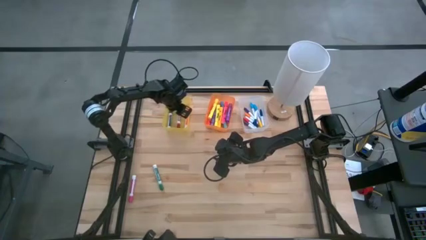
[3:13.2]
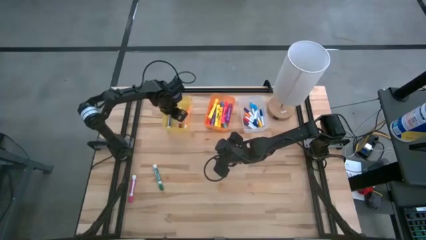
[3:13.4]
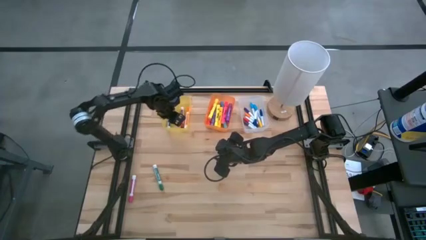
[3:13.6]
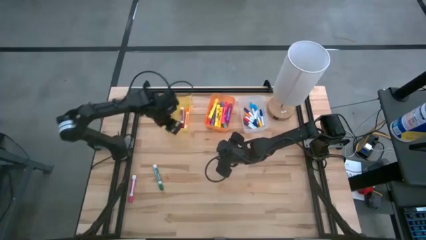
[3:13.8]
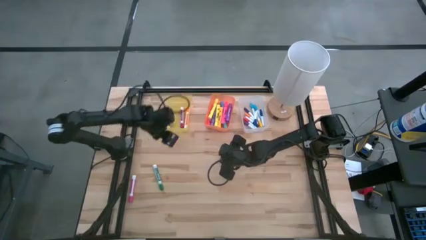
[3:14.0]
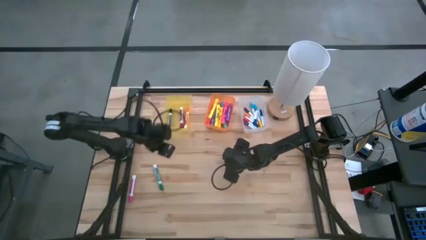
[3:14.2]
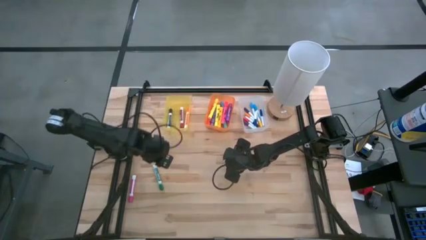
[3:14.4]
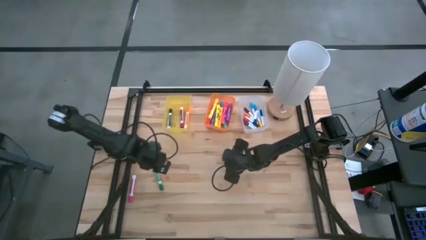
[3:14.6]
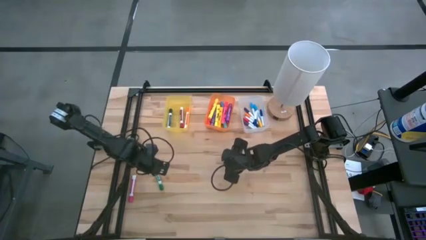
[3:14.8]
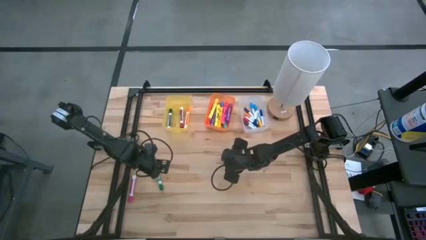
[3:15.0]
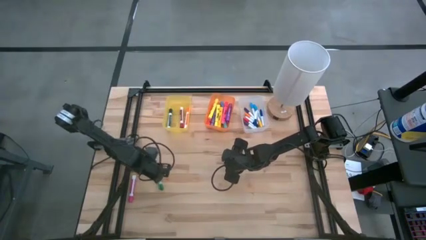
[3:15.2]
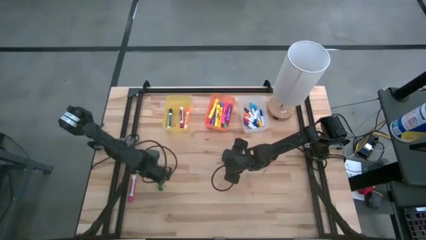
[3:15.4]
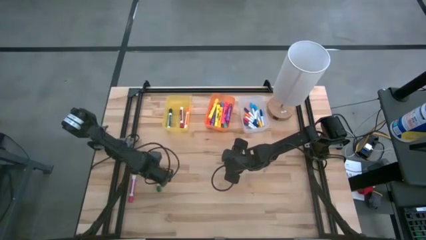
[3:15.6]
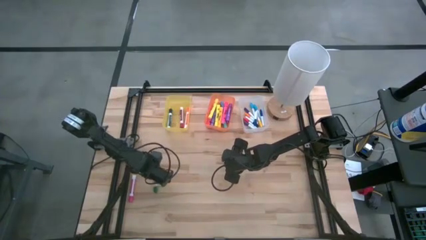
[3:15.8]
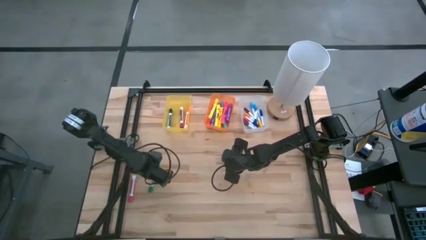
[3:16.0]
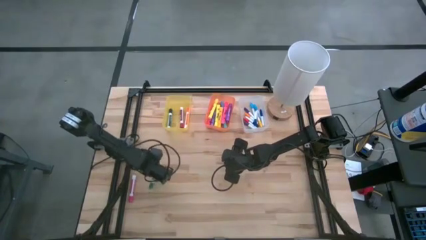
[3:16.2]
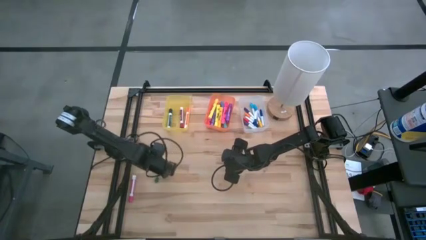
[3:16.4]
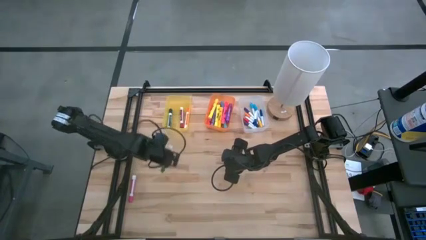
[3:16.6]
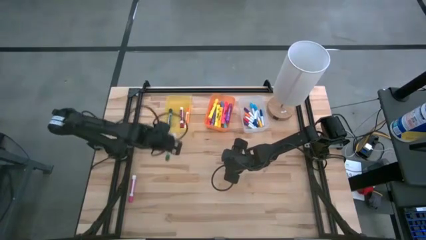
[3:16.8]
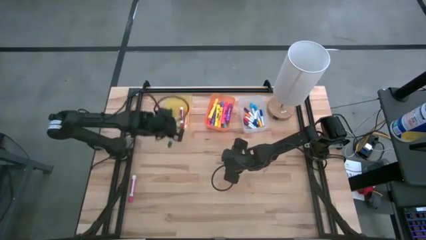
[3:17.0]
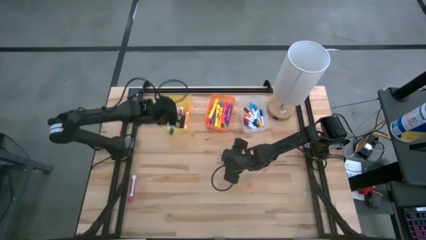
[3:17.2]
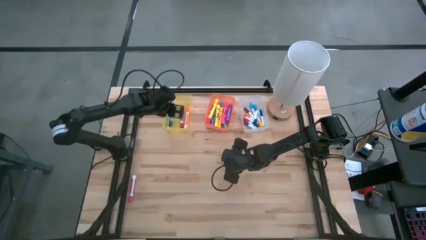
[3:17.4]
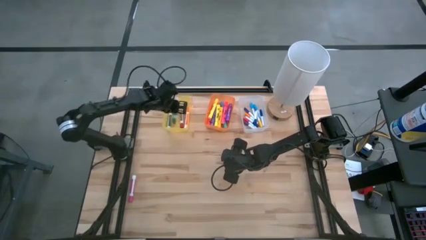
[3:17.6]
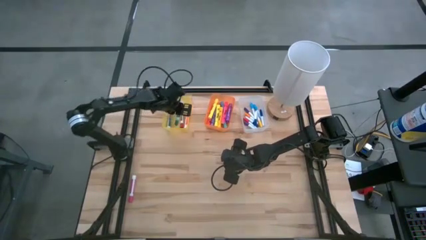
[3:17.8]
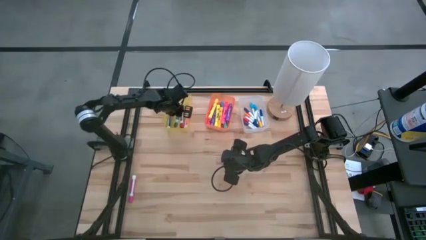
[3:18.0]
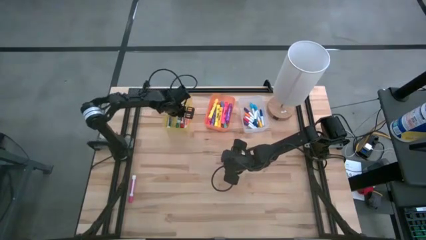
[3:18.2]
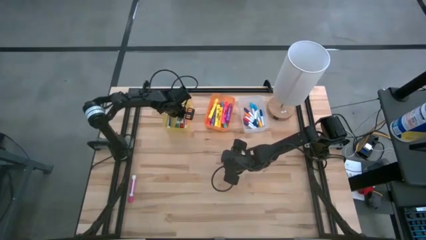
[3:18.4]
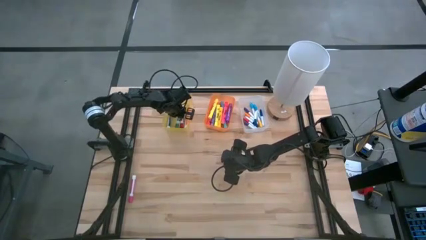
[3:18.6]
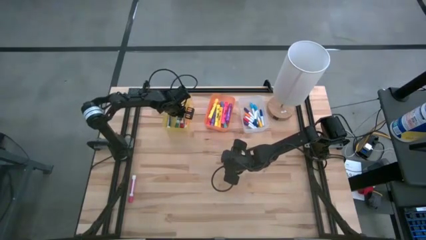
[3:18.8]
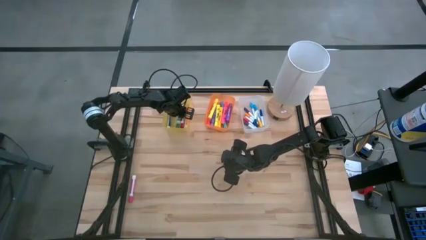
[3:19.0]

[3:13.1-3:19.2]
Task: Pick & Place Markers
Put the green expo dry erase marker into the yellow bin

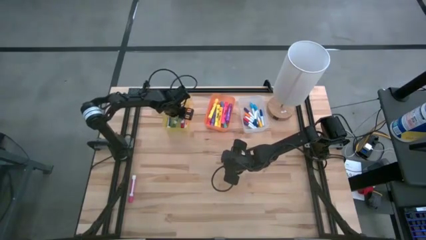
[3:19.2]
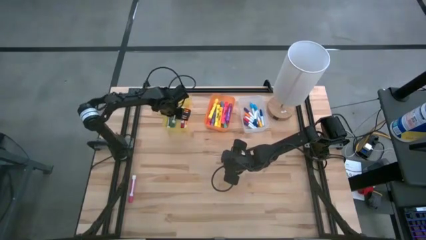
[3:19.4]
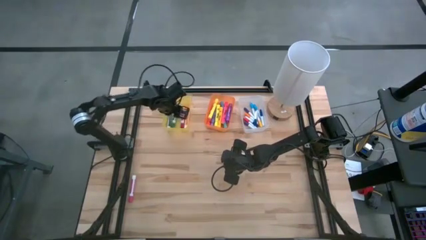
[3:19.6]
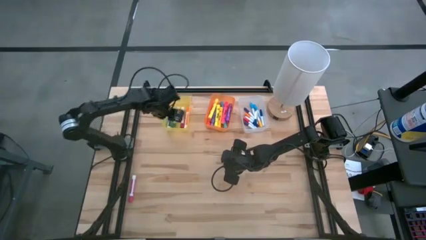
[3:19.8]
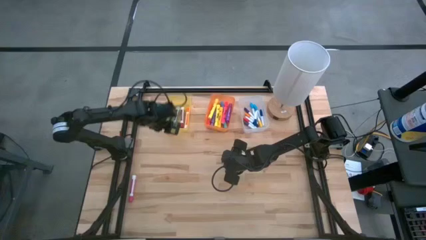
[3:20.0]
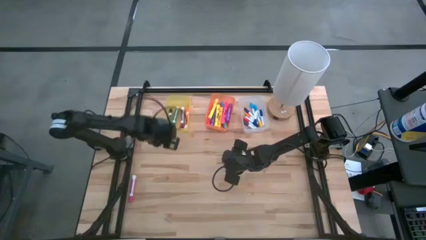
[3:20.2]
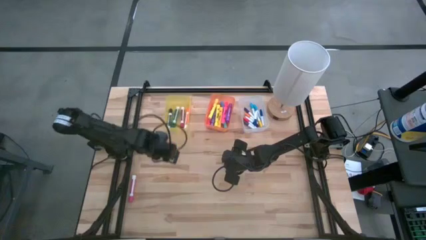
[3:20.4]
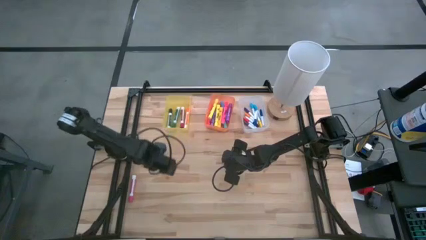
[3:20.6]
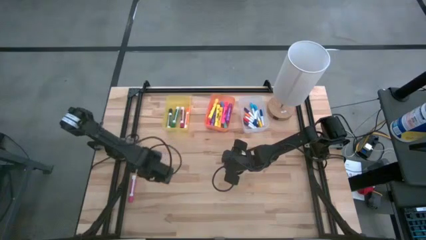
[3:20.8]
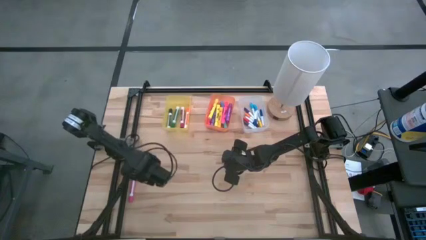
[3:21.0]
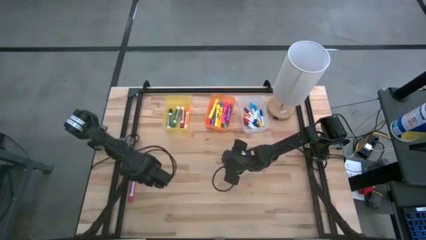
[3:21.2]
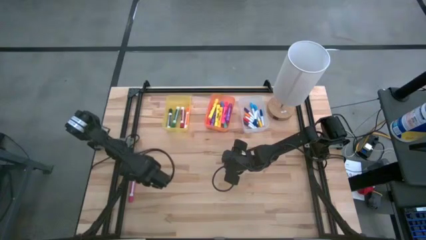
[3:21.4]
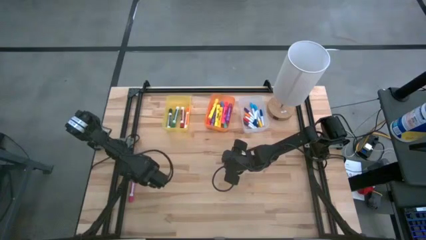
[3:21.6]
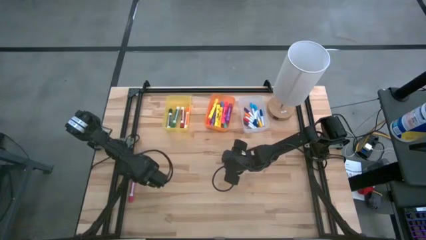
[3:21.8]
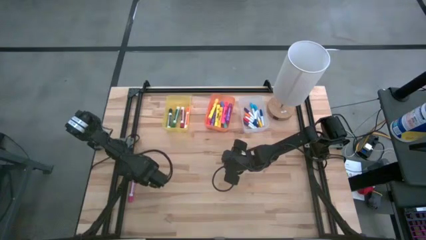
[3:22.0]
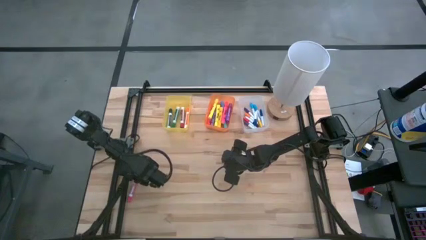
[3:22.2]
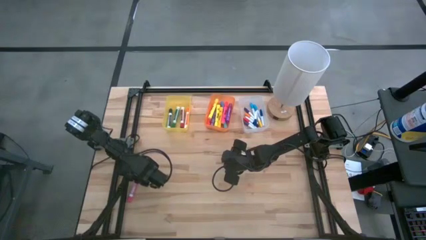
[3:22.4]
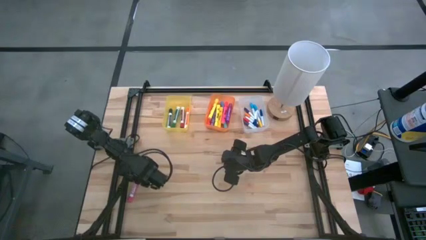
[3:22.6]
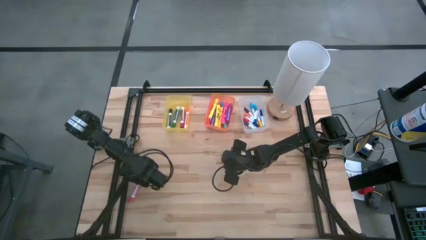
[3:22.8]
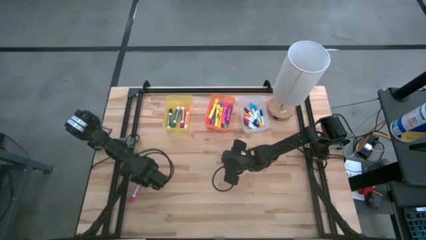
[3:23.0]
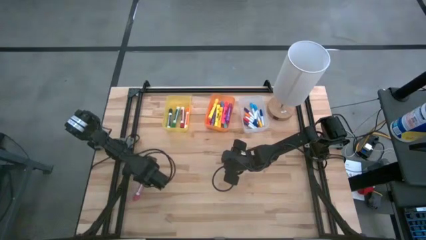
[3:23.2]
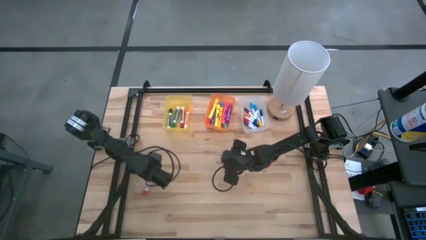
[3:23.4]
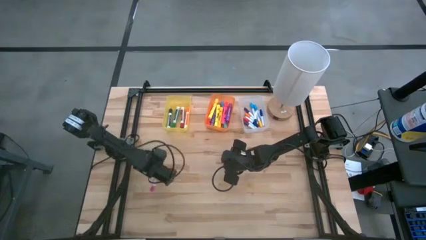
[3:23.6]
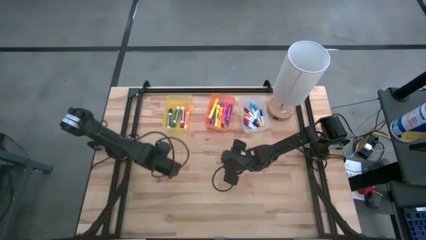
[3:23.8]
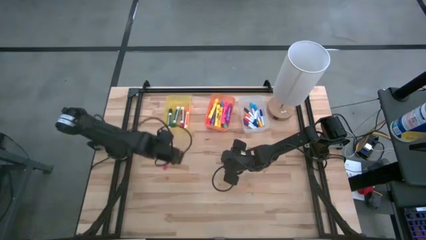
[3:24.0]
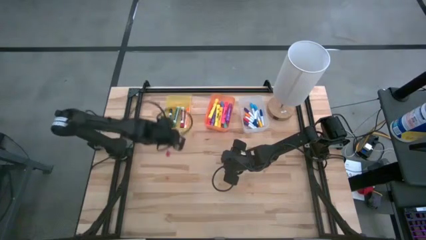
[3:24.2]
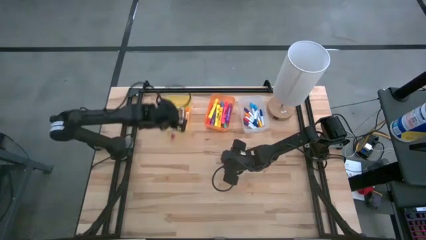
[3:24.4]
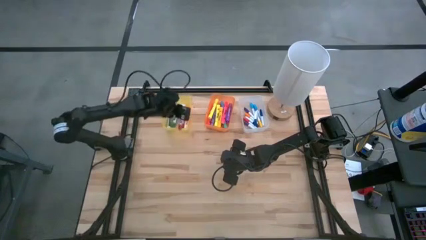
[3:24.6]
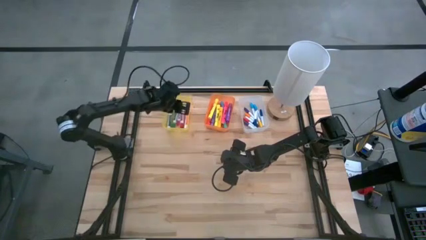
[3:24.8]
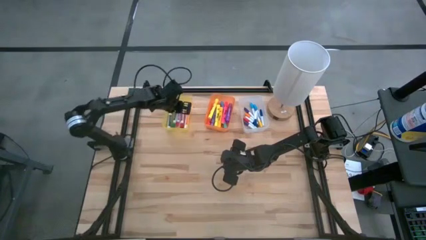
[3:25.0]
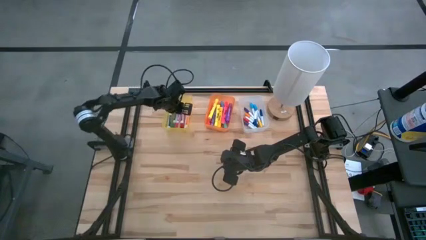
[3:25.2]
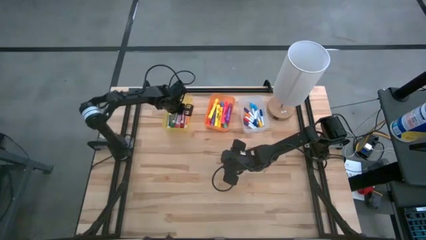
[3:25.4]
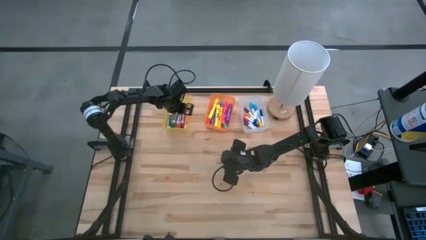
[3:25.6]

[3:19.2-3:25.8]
Put the pink expo dry erase marker into the yellow bin

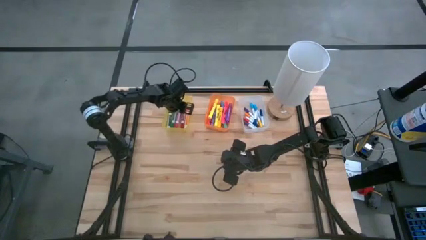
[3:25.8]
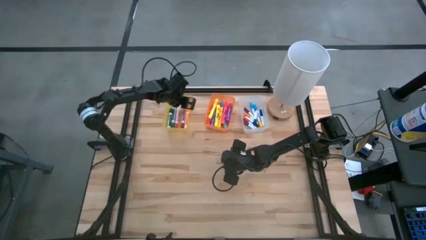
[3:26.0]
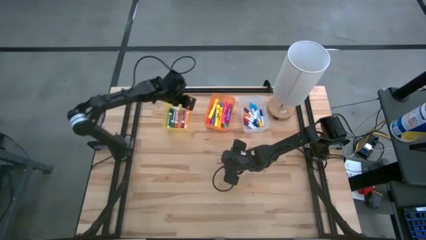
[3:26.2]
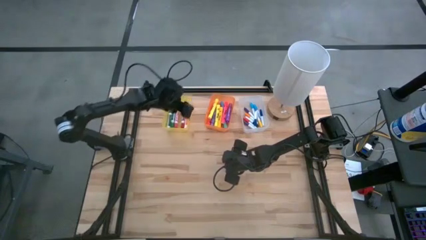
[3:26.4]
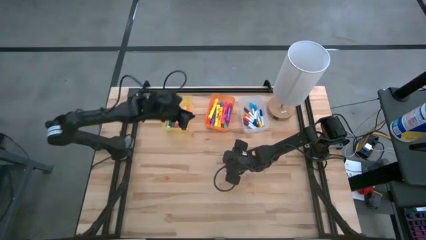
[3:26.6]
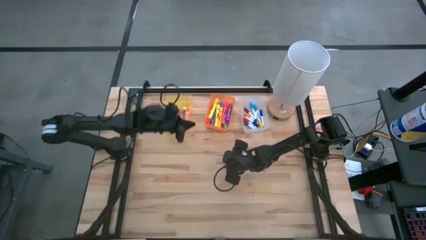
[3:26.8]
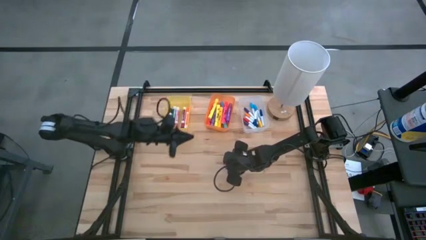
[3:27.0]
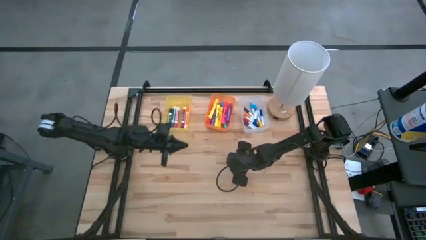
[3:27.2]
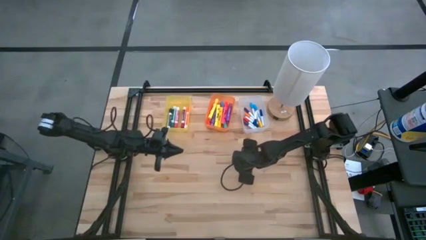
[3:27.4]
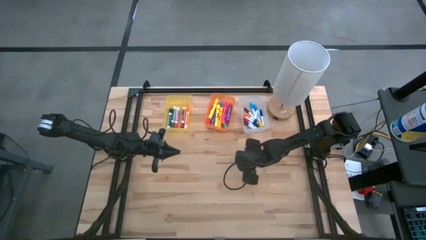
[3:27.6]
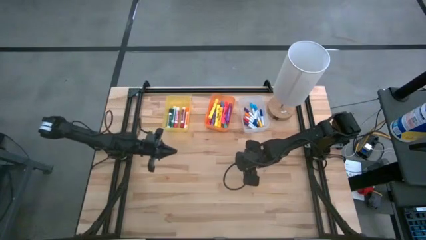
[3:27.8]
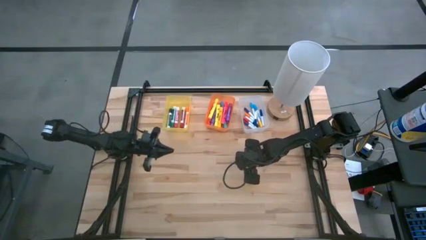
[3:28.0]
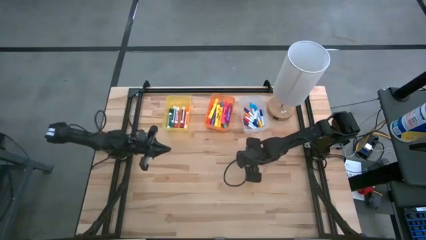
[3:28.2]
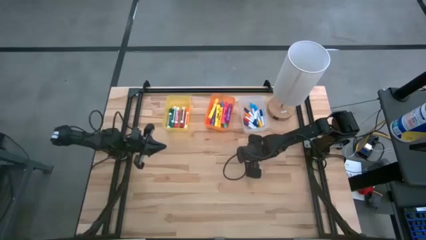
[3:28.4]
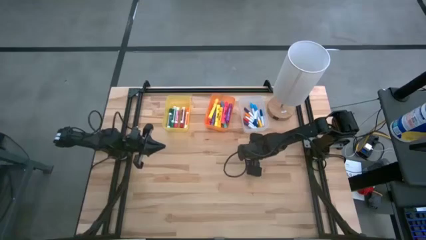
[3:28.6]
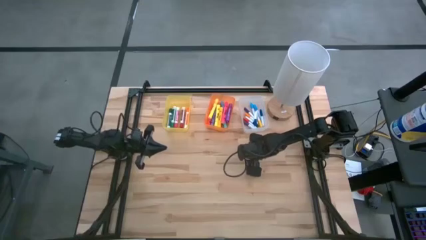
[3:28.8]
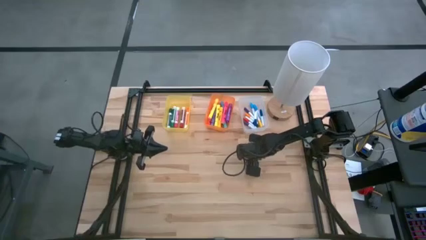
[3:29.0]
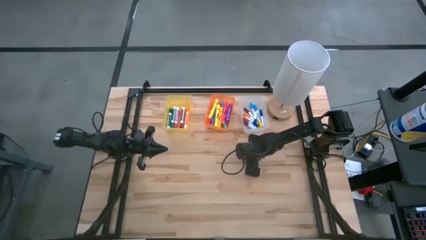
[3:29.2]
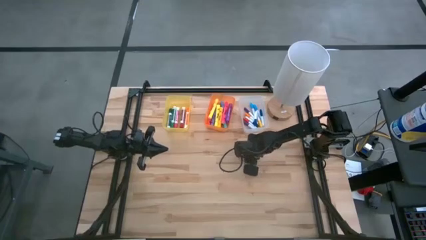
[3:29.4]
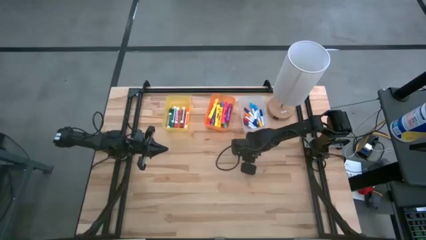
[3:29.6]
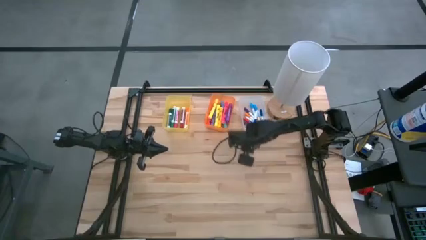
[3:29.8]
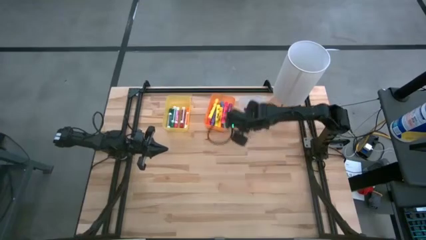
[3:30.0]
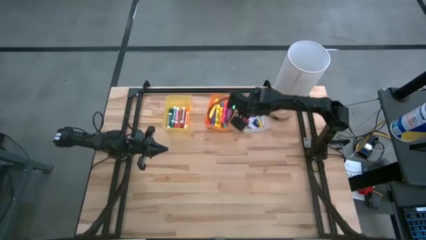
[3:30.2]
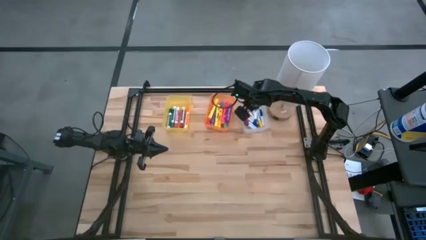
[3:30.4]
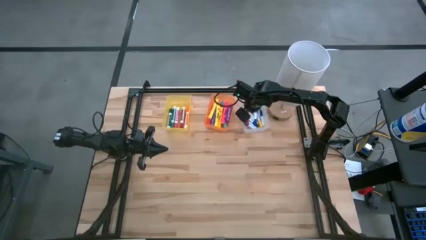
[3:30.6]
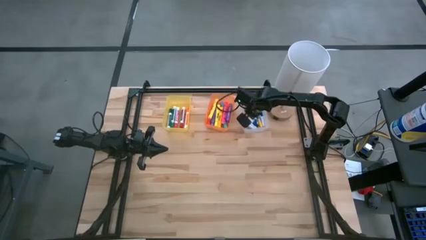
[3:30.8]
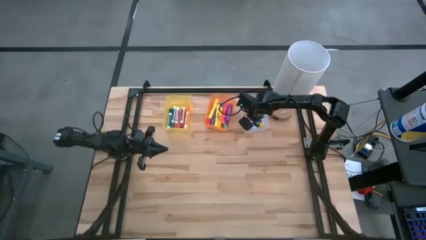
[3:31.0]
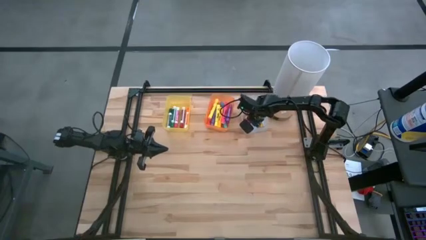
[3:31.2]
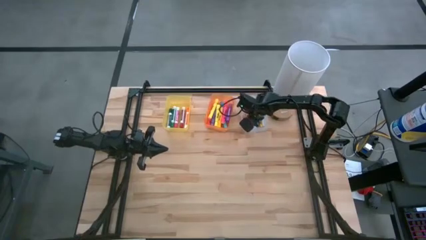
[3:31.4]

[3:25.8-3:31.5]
Put the green mini marker into the yellow bin
